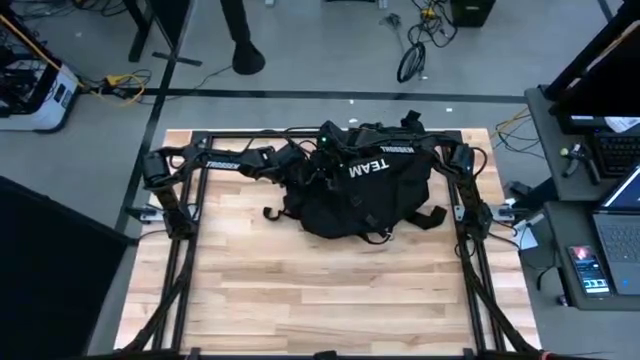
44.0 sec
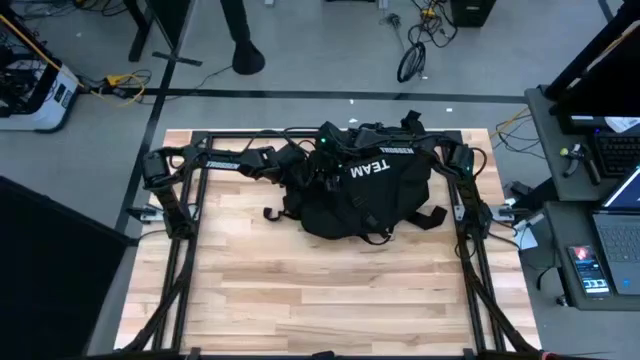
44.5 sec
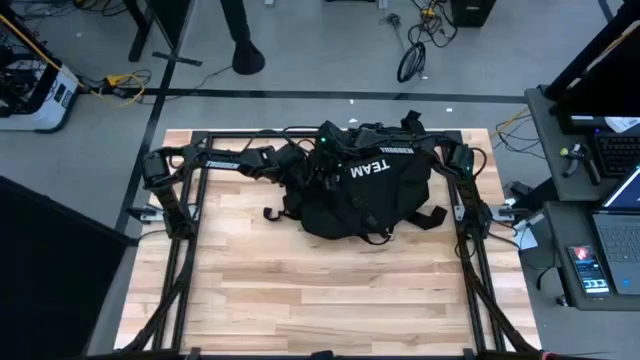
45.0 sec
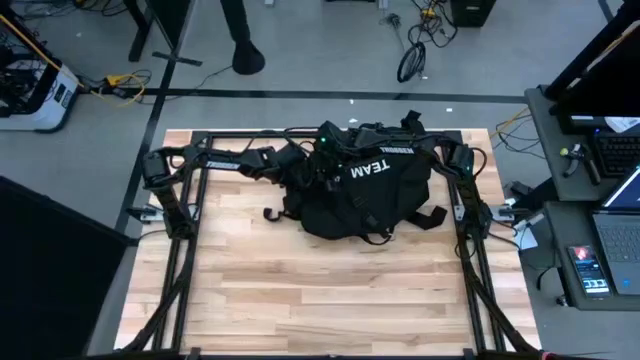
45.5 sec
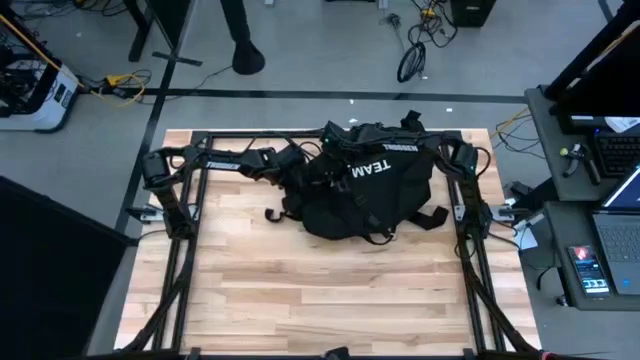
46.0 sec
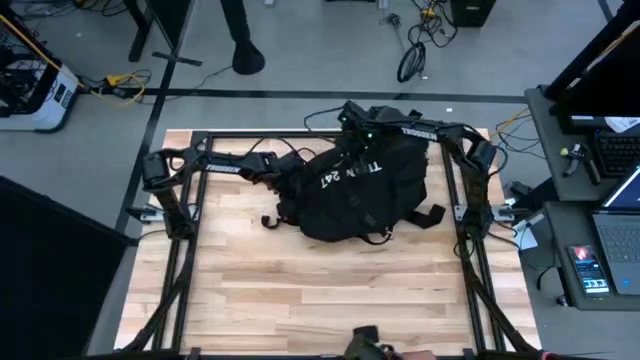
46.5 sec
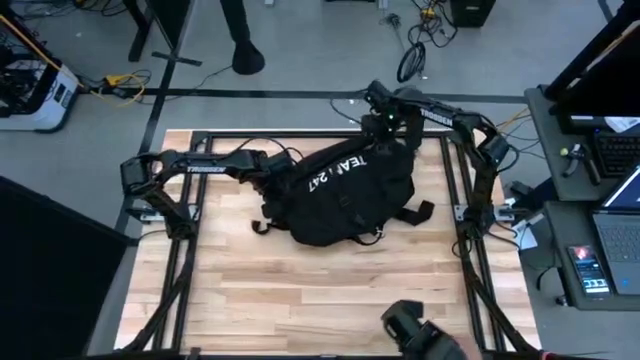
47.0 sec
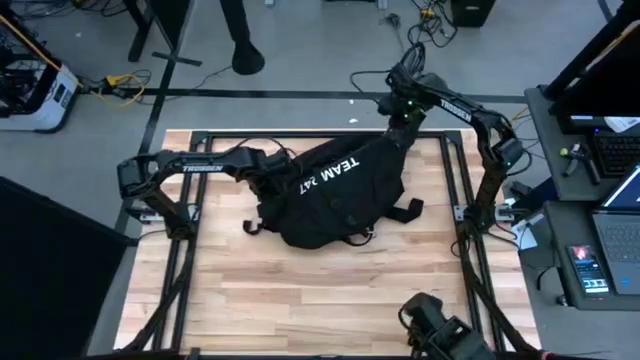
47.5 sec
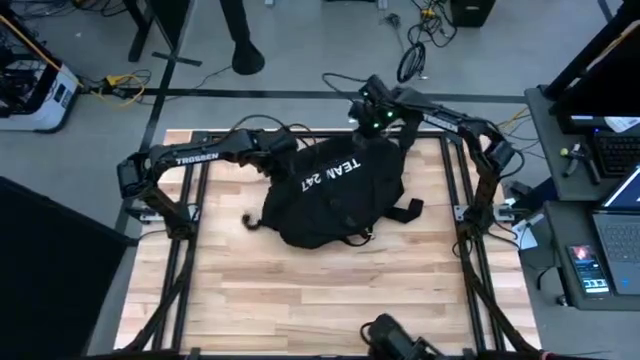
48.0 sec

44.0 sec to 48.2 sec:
Task: Unpack backpack
Open the black backpack

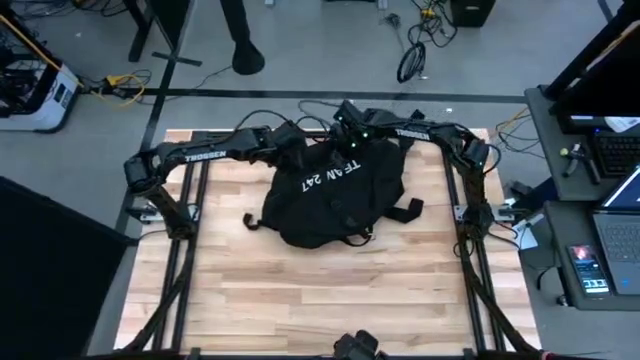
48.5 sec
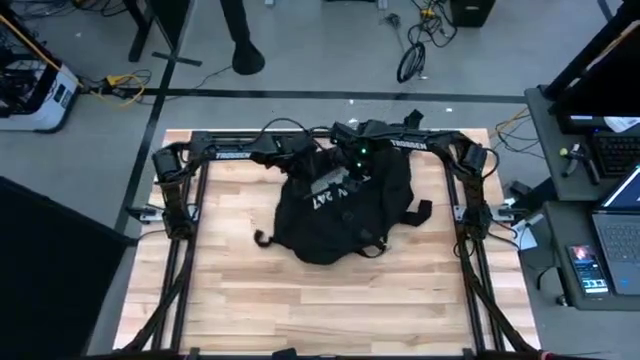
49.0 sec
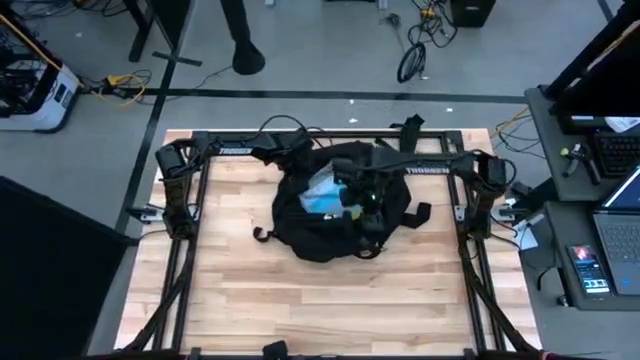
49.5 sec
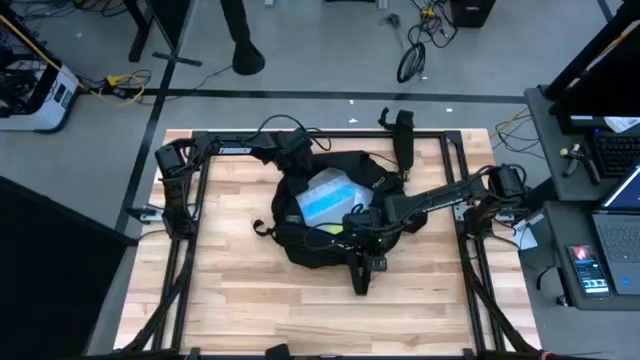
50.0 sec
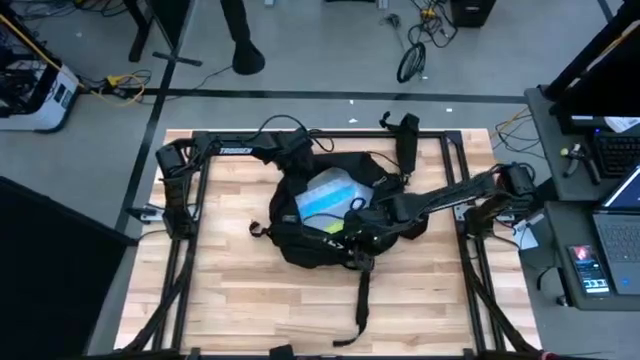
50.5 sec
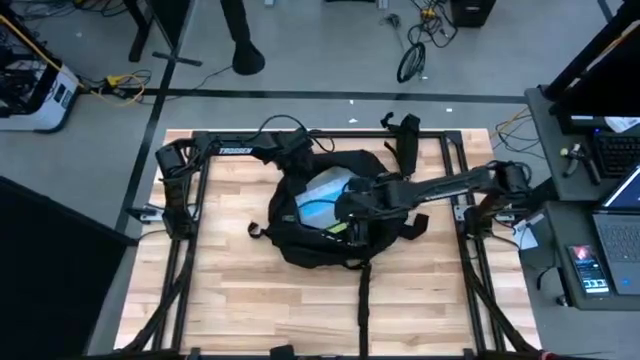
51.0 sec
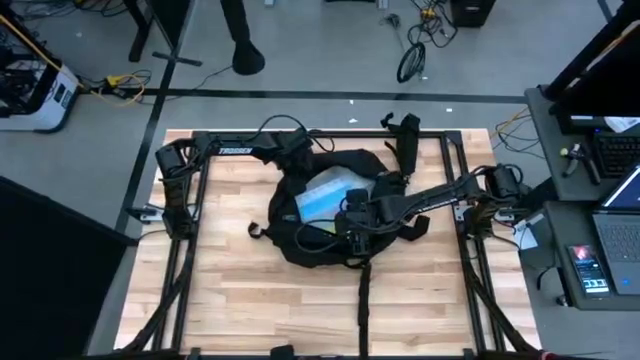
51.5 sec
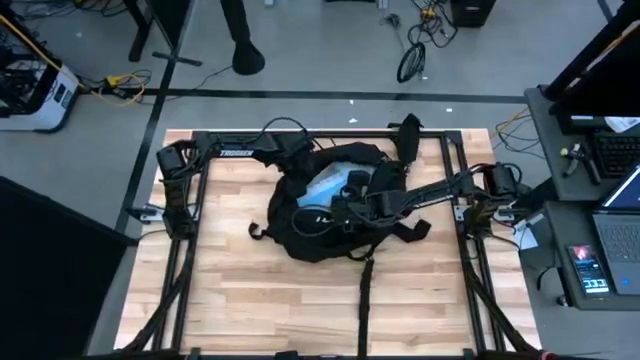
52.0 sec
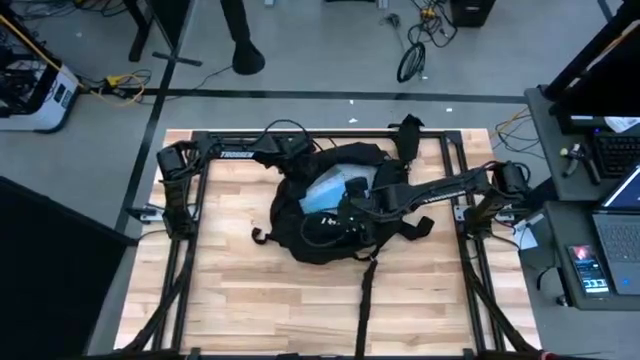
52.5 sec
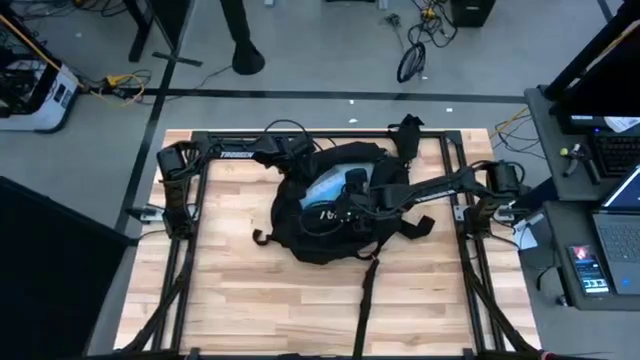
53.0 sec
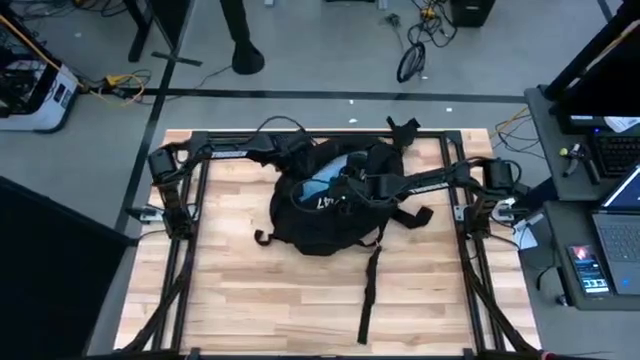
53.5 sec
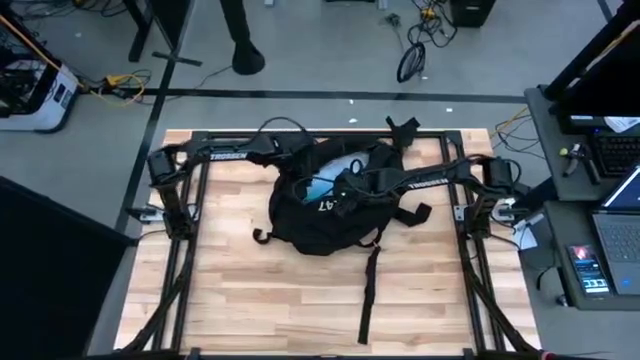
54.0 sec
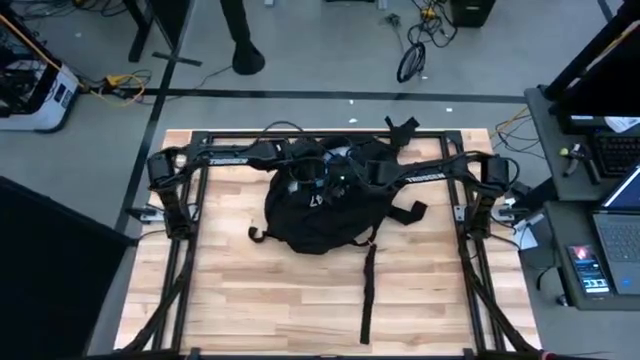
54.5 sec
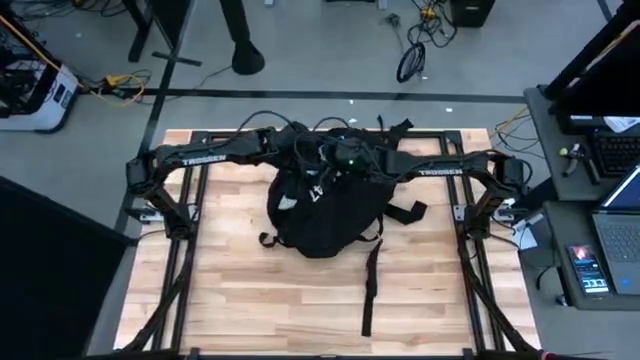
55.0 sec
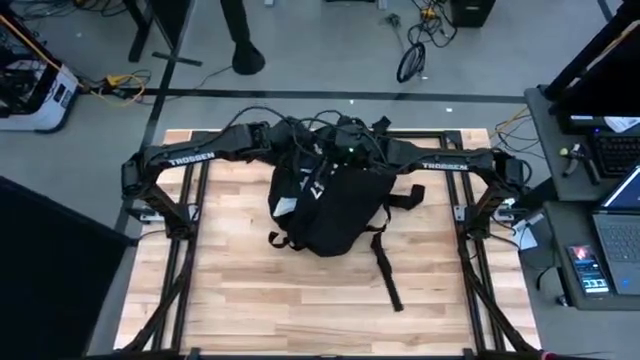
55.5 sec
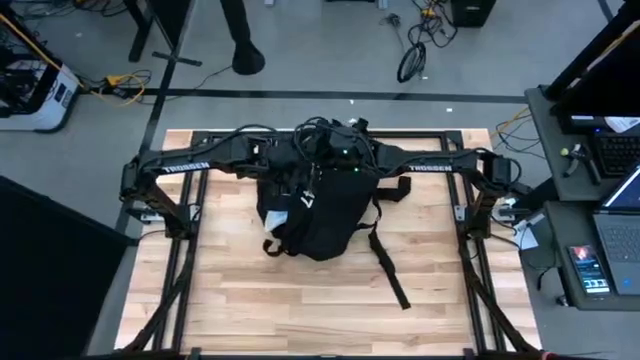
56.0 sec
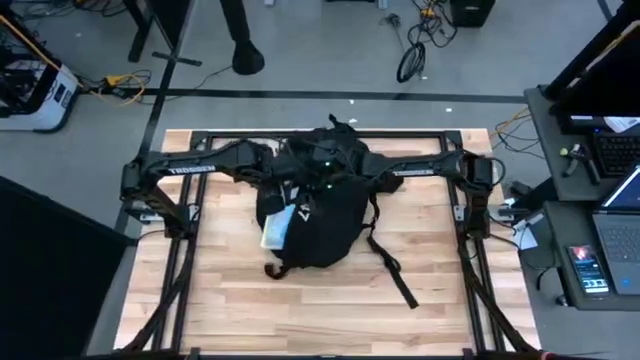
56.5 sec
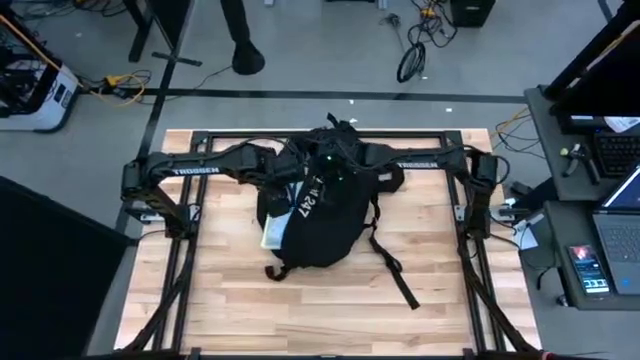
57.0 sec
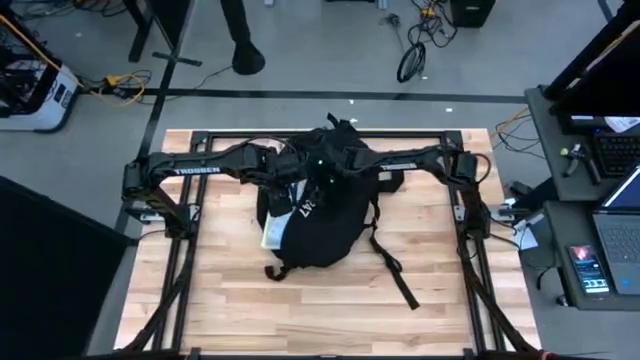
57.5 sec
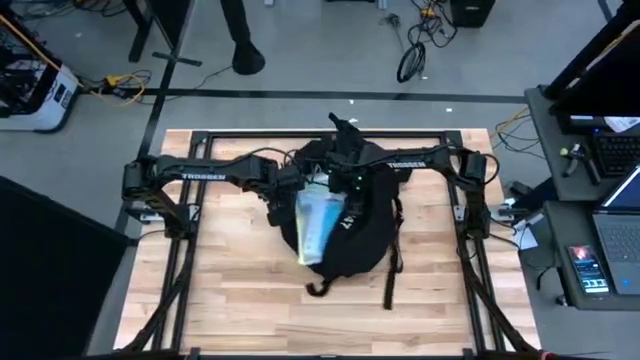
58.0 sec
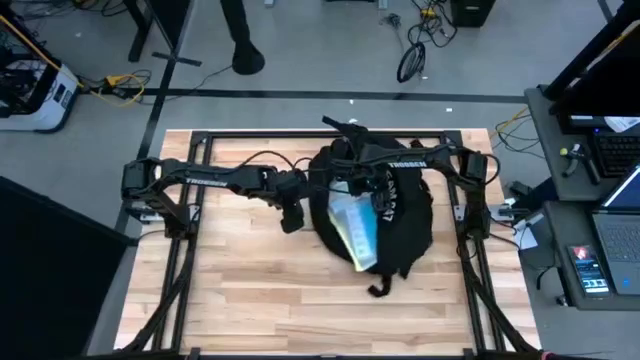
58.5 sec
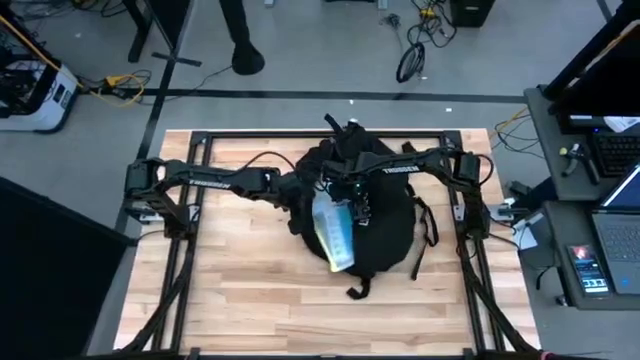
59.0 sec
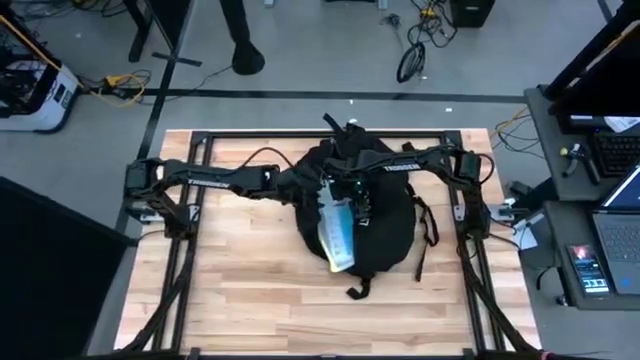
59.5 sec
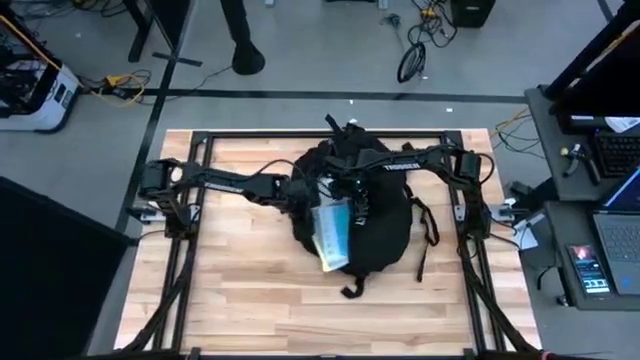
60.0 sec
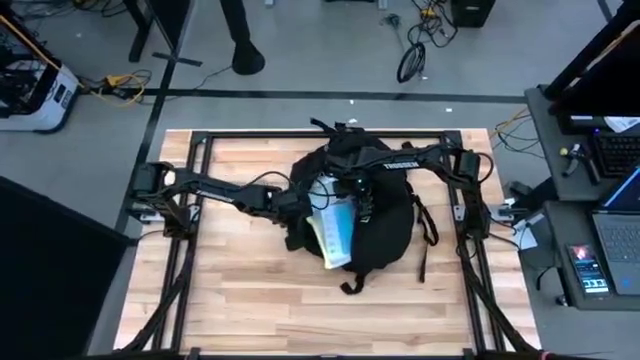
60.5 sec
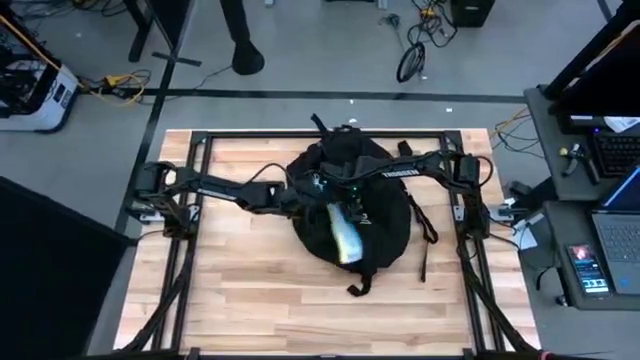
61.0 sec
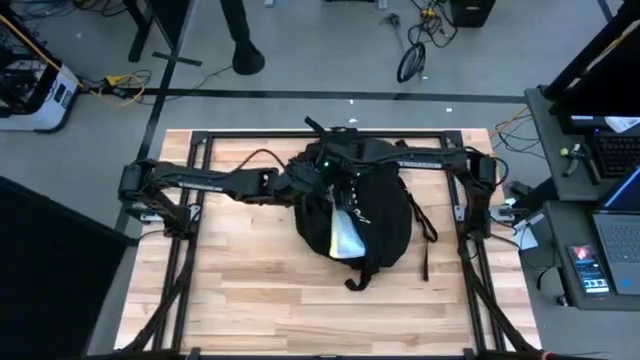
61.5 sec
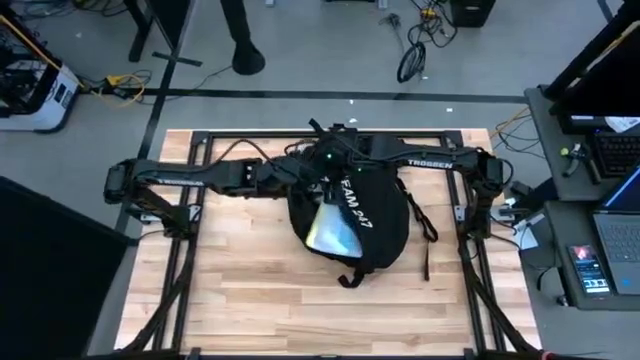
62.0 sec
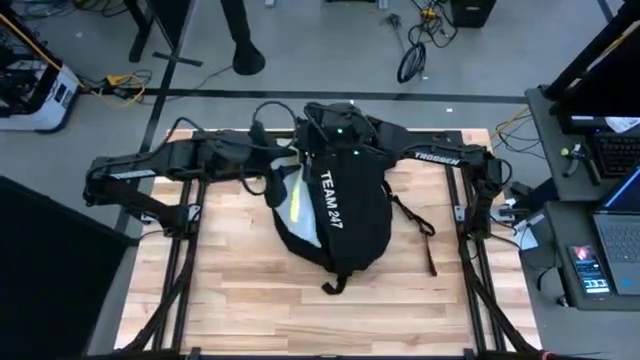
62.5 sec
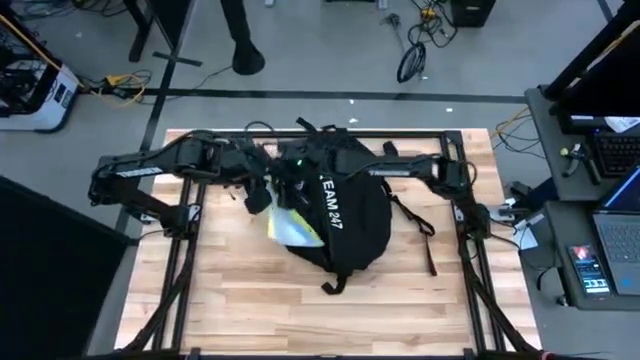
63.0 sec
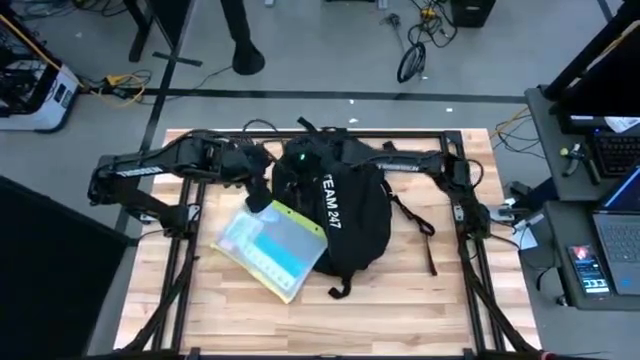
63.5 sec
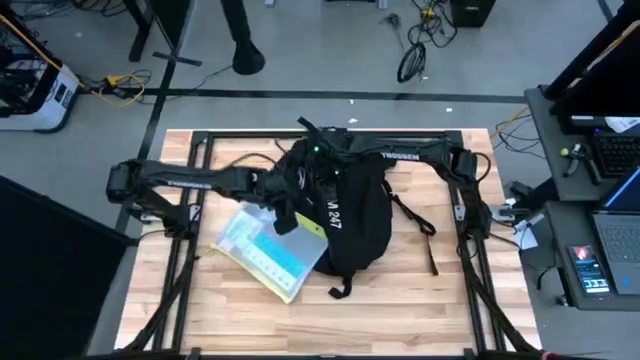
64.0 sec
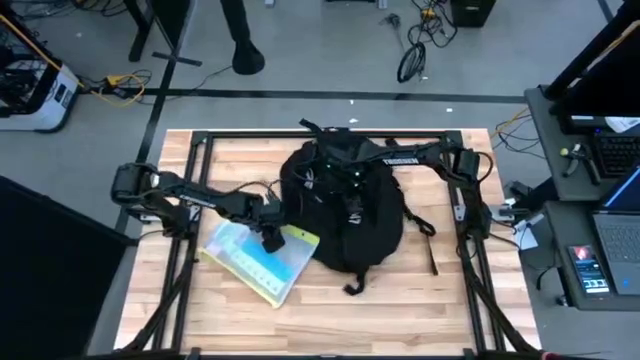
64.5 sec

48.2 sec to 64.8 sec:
Remove the zip bag from the backpack

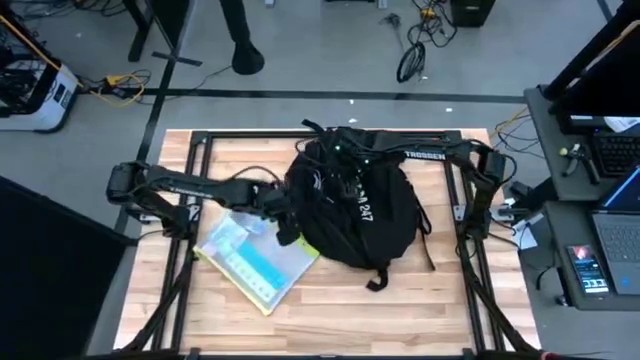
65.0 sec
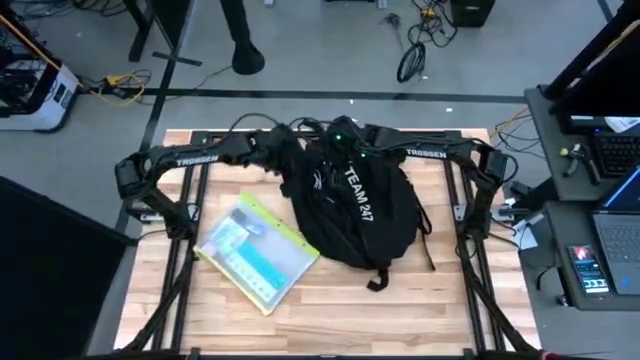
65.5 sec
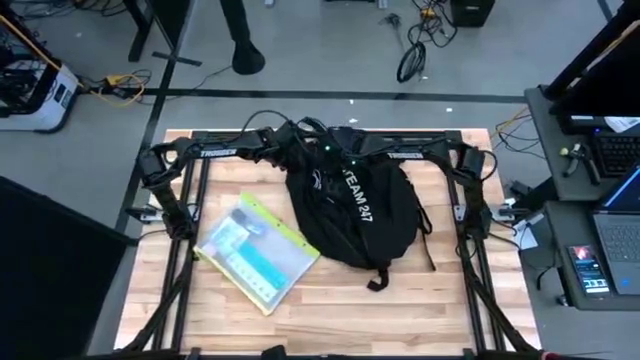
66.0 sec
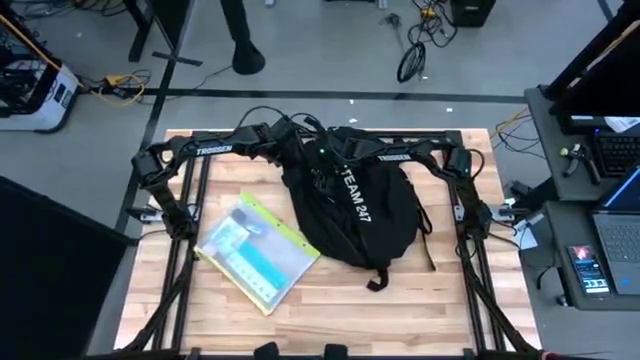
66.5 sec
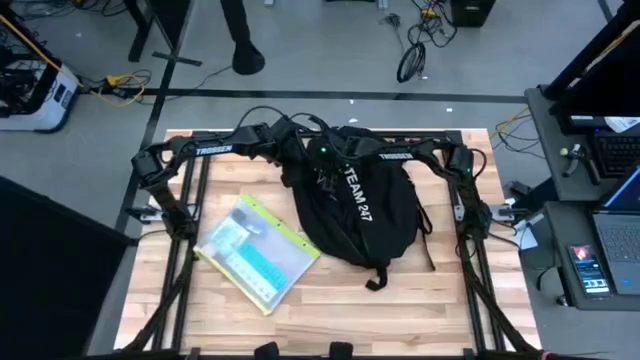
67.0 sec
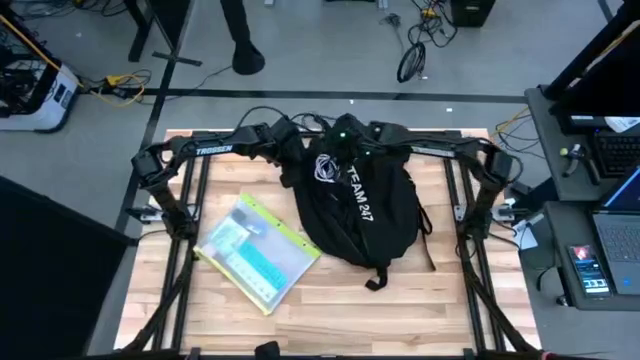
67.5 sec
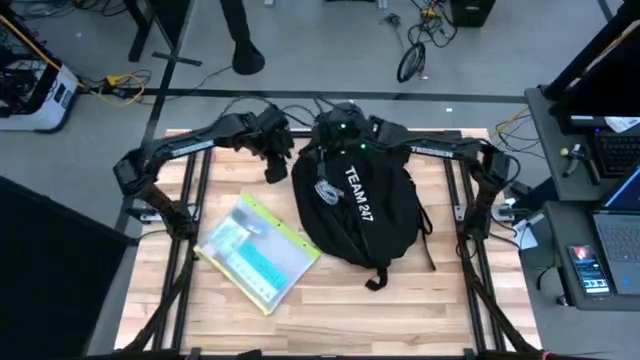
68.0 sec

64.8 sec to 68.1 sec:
Remove the white charger cable from the black backpack
